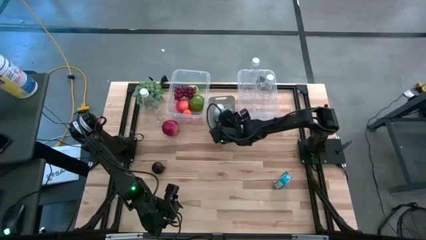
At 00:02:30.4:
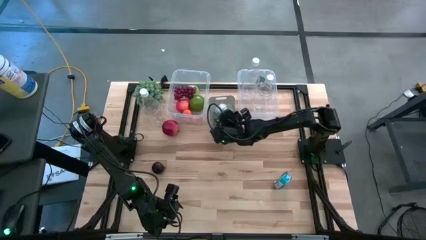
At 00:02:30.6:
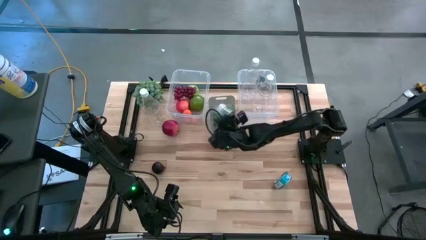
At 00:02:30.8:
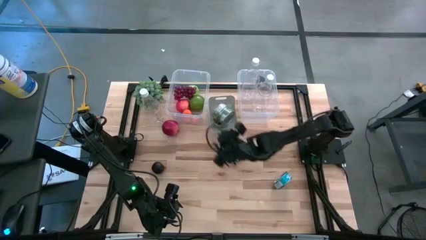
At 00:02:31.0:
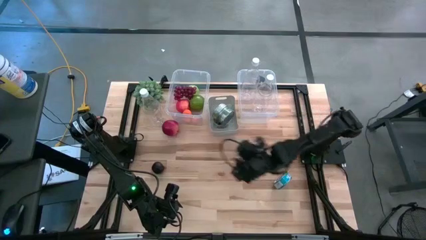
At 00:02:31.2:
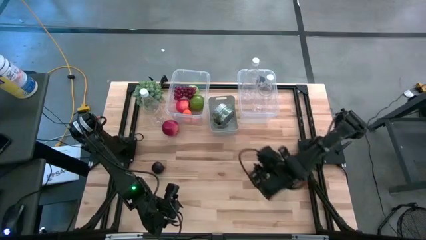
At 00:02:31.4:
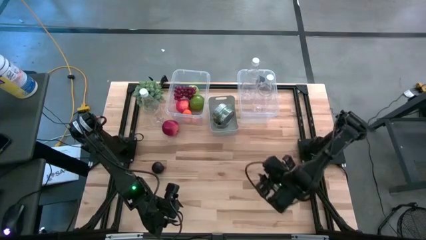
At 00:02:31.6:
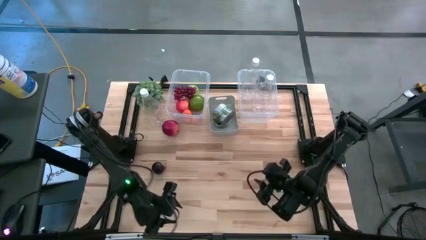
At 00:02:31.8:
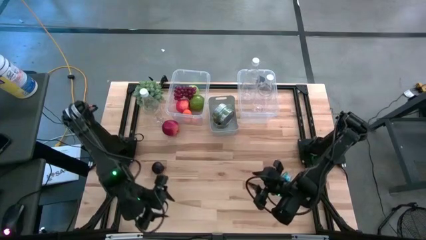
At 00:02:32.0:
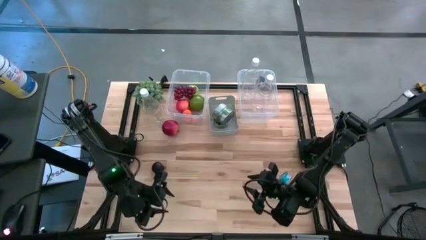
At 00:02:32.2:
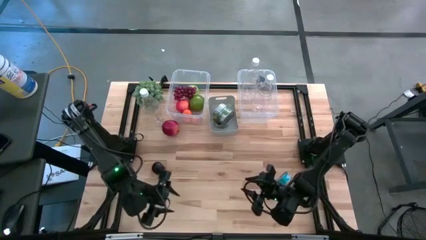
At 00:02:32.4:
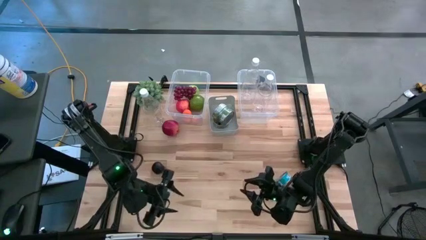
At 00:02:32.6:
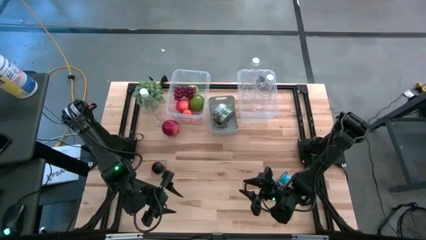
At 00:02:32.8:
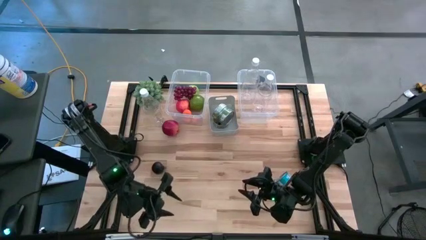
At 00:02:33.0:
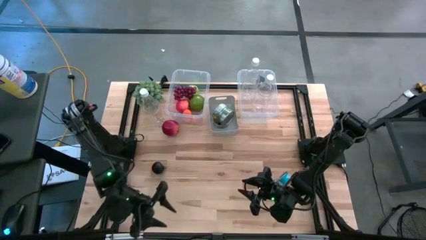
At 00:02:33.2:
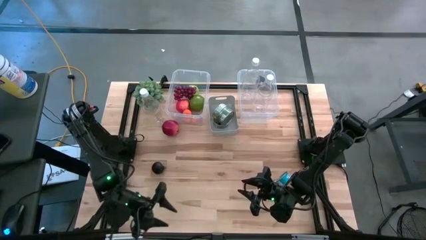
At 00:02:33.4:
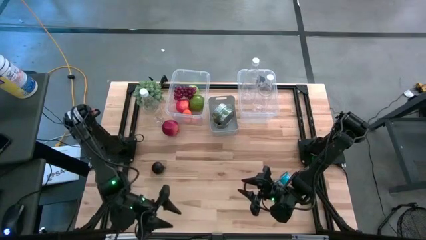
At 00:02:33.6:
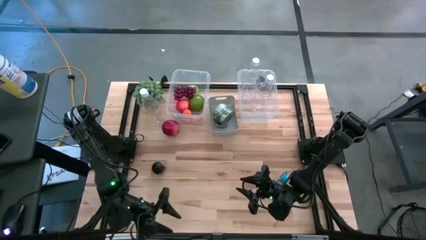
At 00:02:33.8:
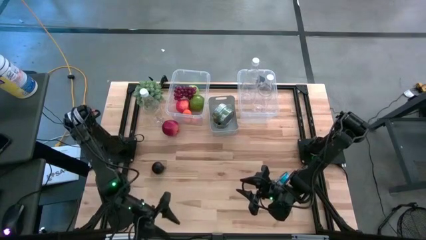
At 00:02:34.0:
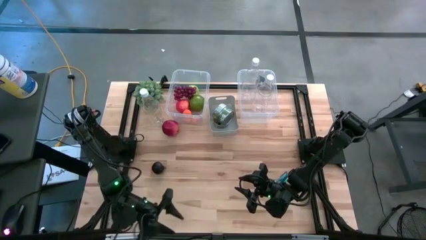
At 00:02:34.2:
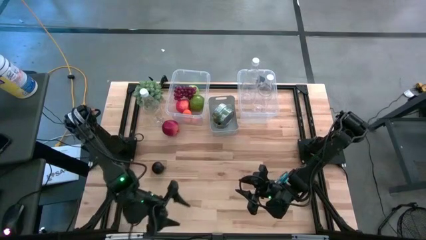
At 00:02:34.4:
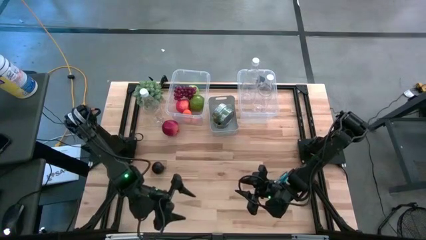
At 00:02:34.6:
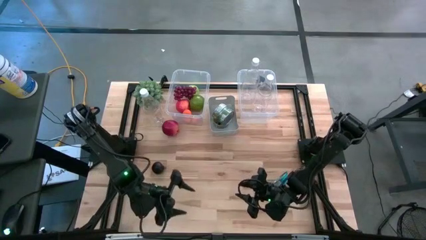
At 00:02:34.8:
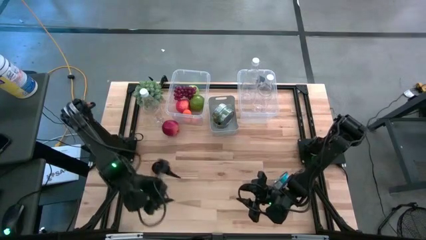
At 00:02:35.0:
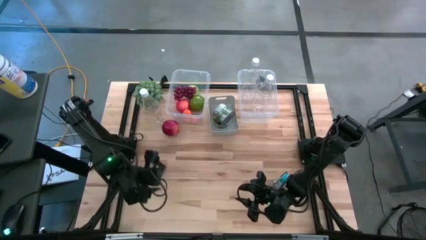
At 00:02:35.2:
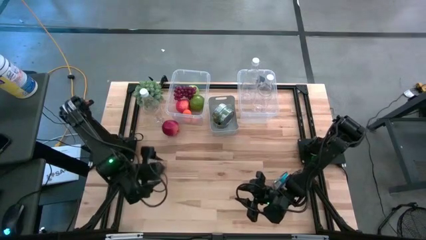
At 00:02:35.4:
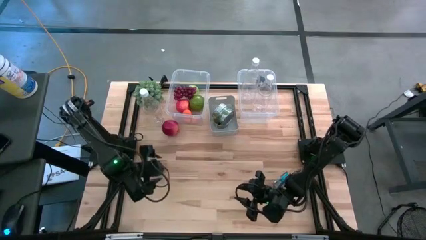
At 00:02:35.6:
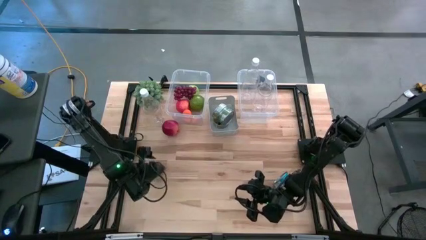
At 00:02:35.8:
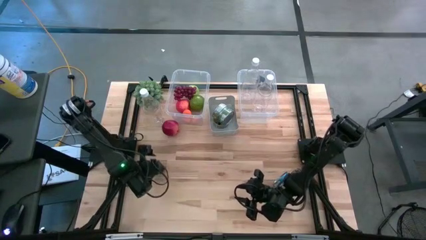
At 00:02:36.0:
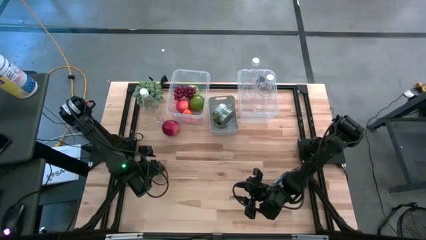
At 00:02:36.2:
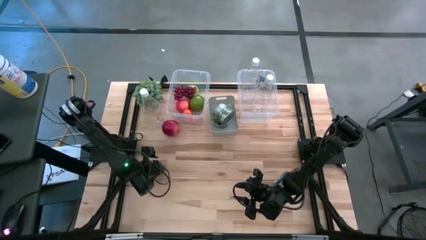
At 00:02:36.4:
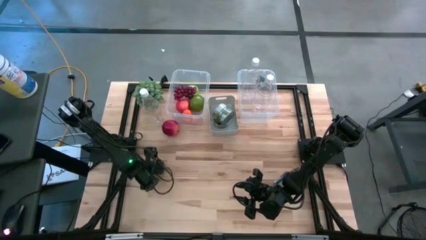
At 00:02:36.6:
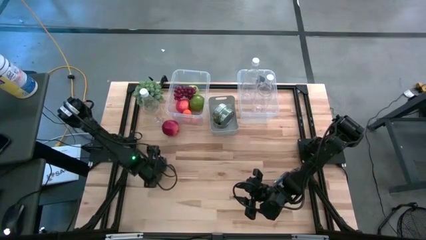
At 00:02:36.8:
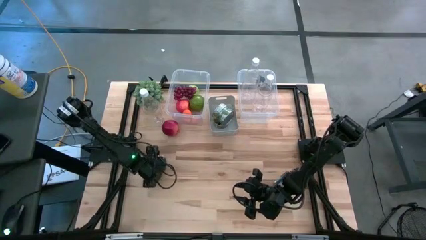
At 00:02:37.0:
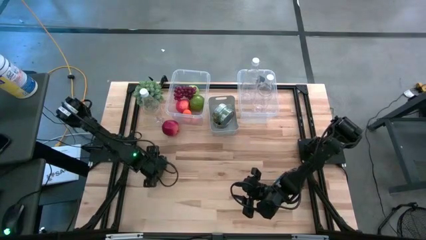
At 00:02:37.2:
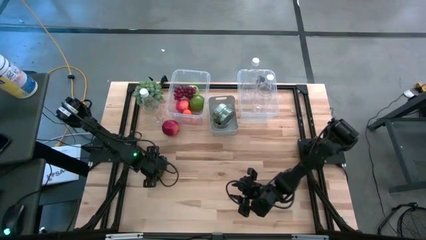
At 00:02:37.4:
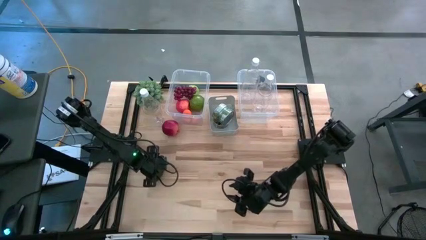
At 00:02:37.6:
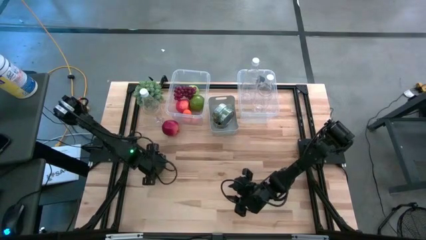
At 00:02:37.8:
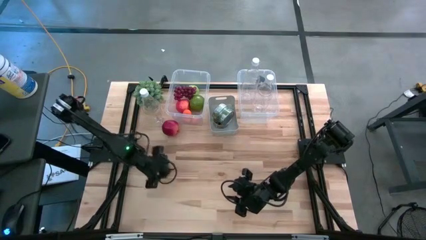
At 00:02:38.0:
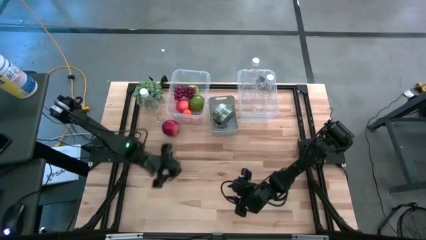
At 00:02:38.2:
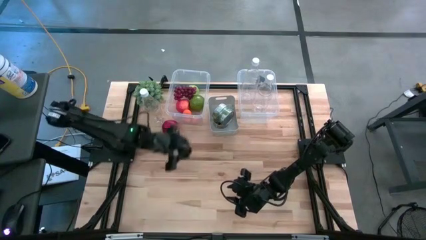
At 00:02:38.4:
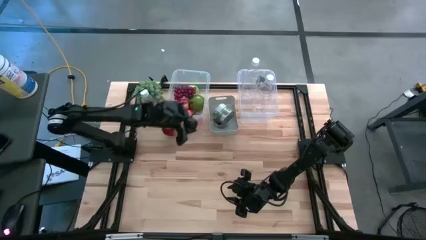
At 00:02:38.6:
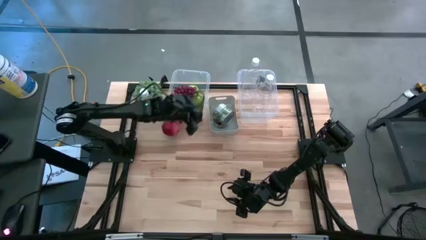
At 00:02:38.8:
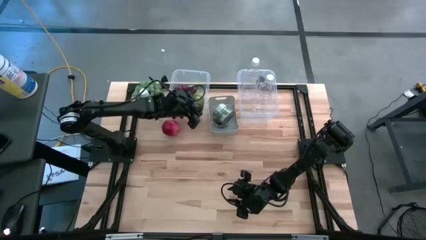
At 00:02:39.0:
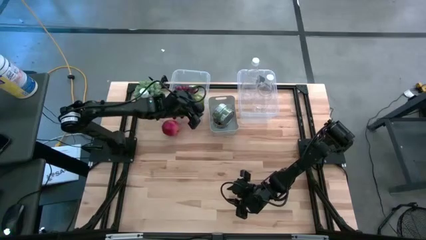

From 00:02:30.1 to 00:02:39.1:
Task: Pick & Place Food Item
Put the plum into the left transparent bin

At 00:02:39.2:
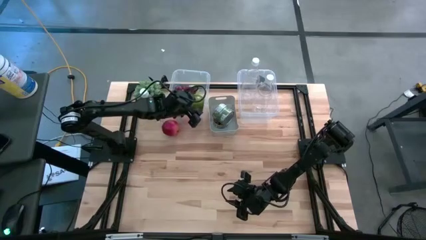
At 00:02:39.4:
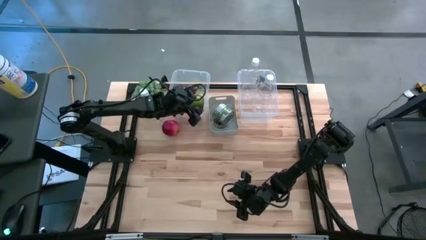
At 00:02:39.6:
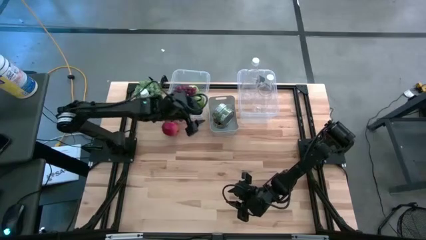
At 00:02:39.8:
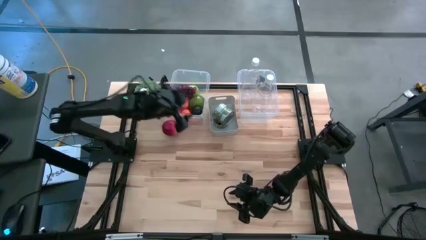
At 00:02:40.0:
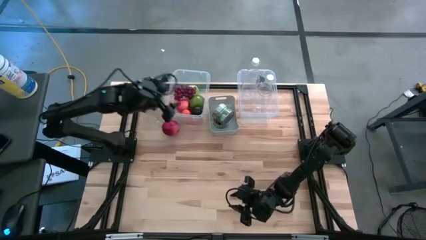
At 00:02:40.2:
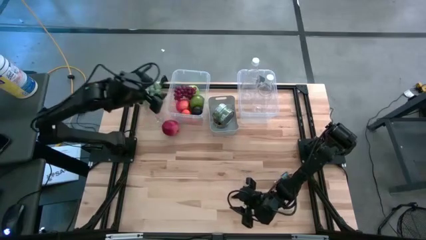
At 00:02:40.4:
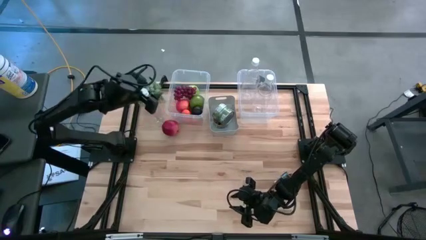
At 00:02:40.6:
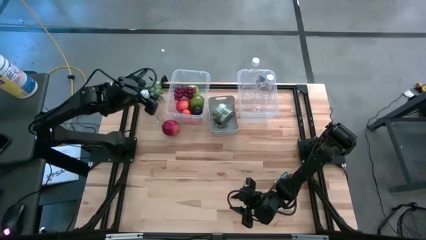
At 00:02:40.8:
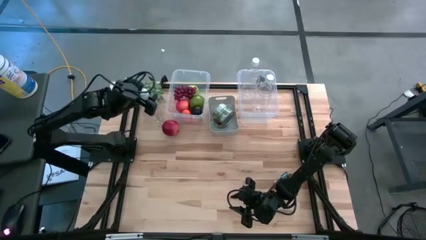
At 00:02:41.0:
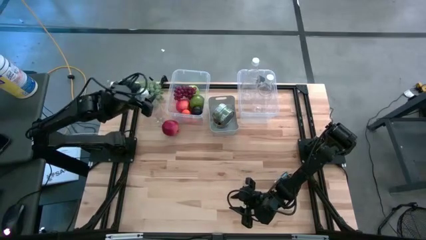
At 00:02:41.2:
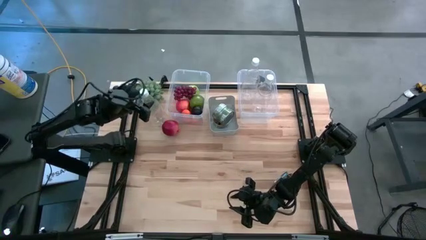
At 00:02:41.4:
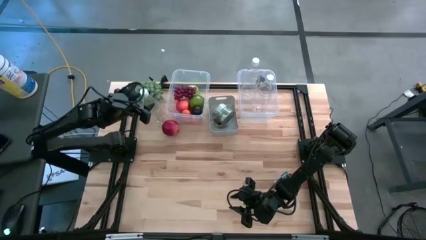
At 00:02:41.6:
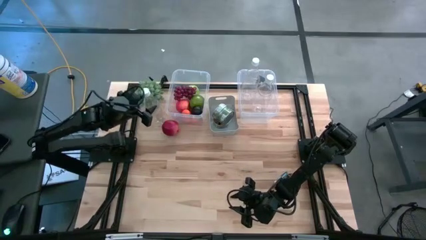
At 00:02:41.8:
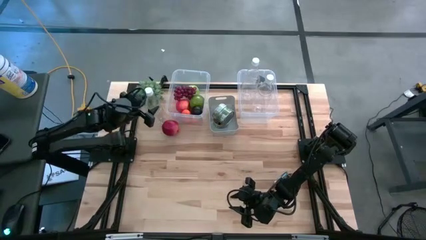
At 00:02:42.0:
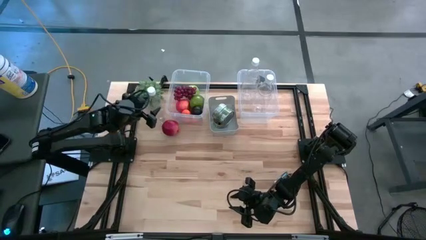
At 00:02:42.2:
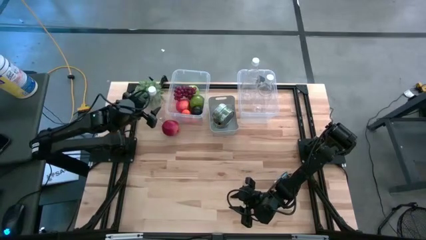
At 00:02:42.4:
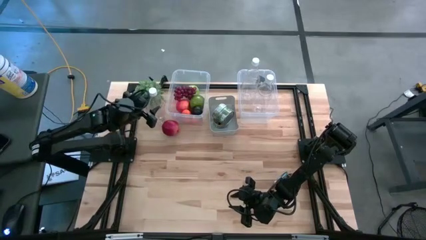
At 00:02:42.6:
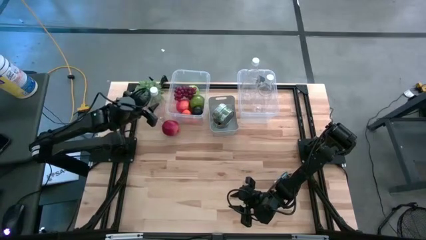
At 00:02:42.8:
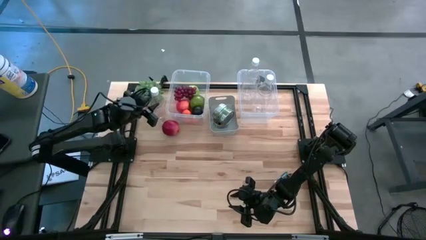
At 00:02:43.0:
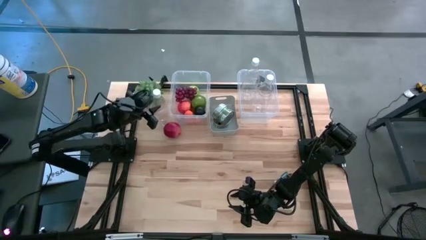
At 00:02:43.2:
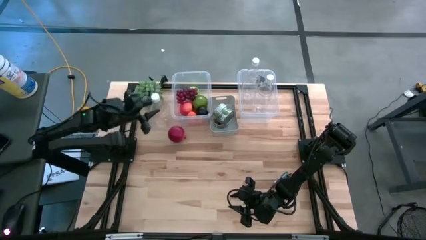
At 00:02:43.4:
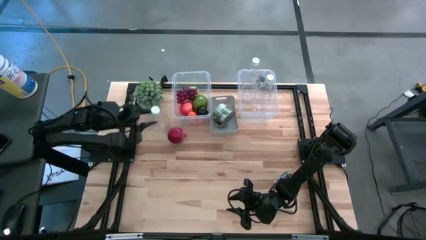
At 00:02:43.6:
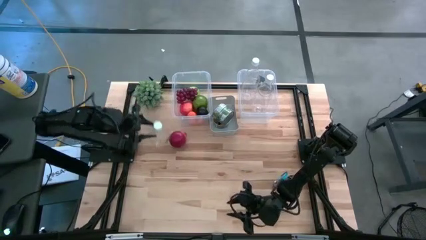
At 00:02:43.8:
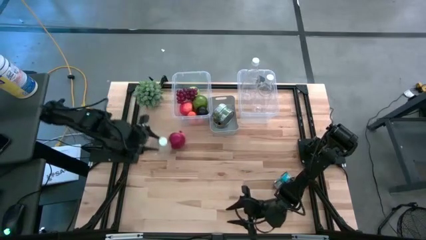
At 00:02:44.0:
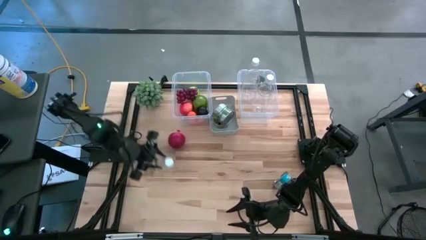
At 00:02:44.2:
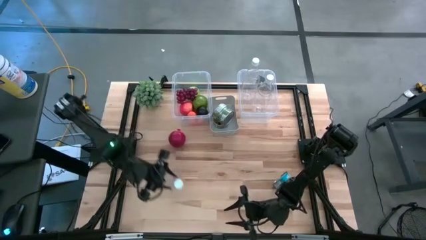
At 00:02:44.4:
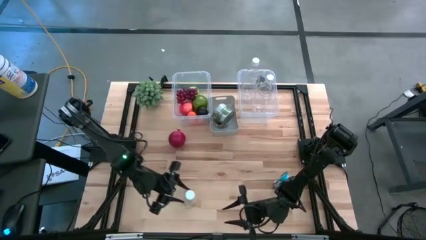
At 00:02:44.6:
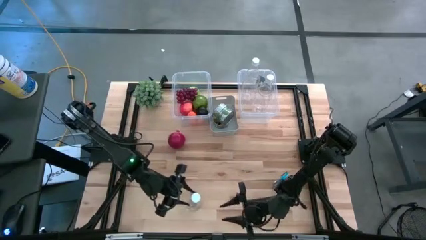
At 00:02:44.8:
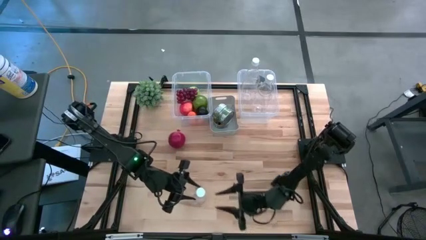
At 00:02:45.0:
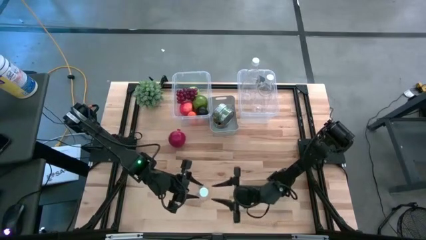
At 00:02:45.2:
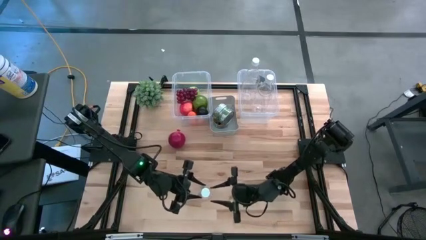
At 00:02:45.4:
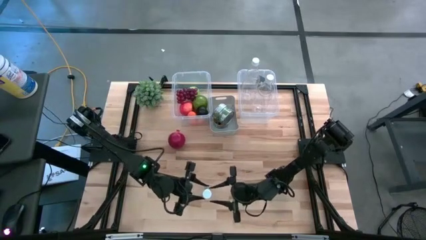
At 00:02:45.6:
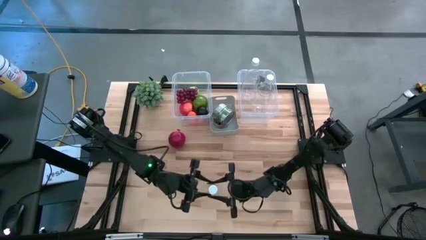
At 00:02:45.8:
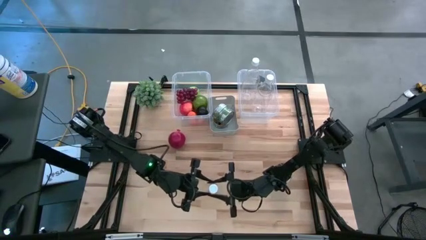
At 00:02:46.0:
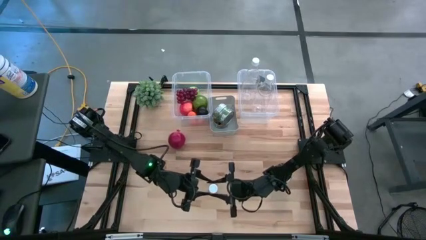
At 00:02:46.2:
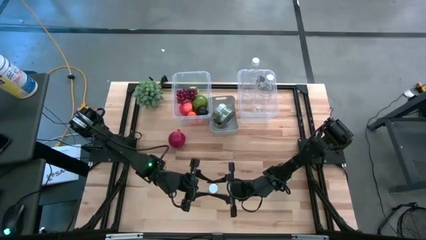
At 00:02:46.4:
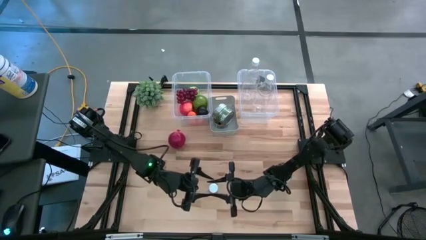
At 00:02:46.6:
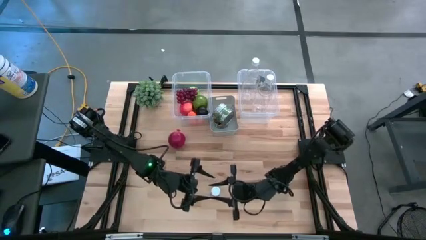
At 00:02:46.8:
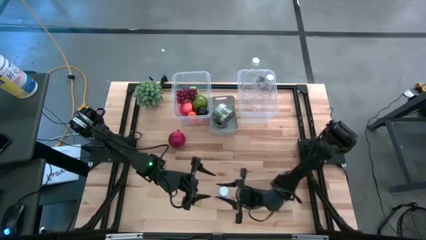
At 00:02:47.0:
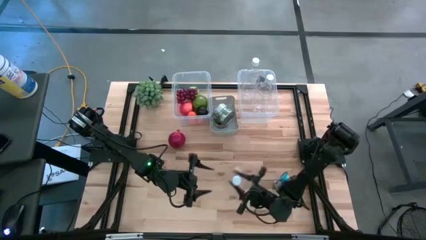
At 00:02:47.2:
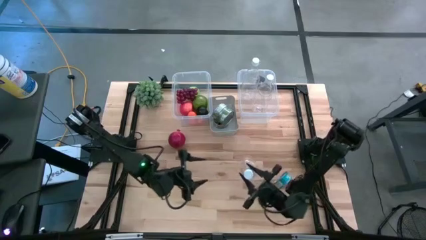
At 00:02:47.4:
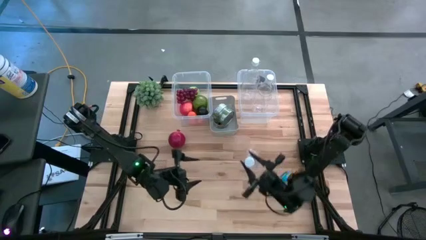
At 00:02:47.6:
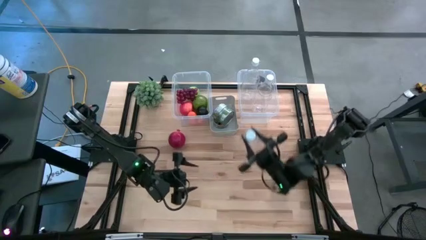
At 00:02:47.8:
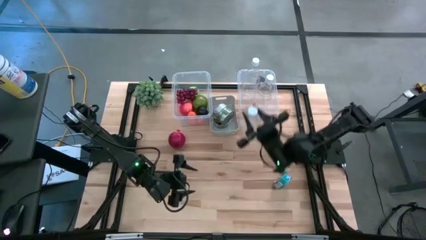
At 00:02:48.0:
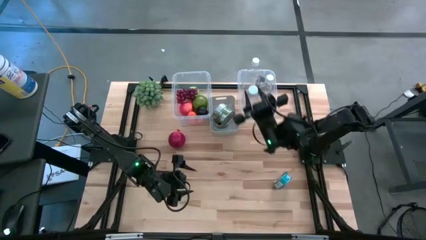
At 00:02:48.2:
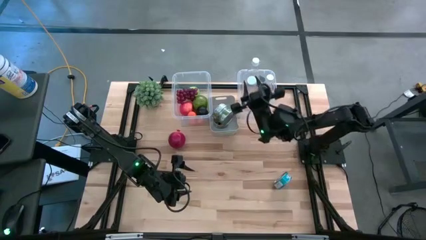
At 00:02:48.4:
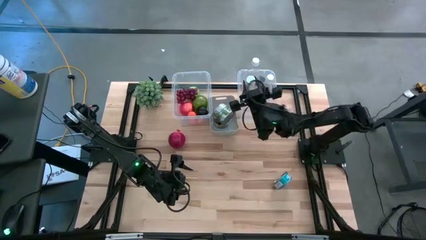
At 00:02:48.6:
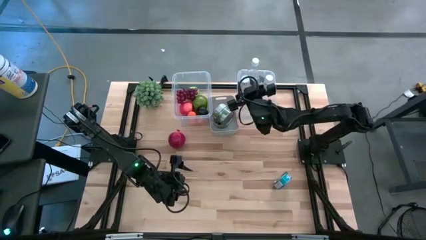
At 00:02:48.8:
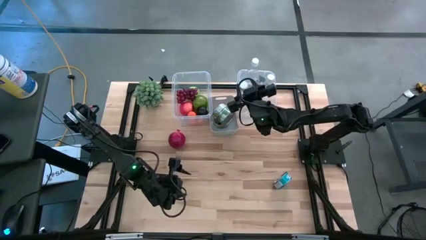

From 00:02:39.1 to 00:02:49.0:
Put the plastic bottle into the right transparent bin
